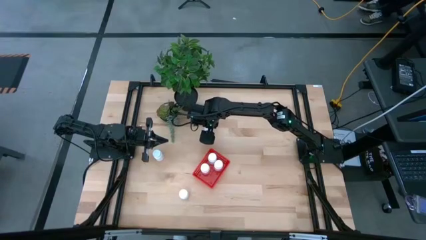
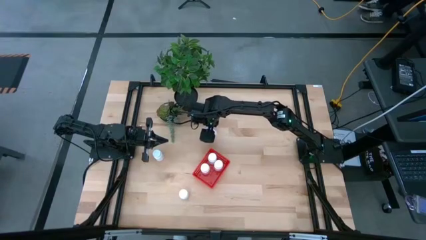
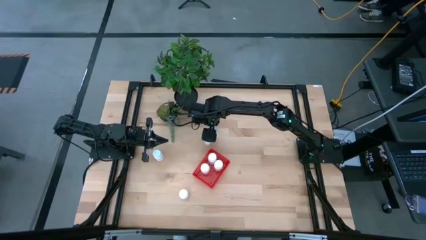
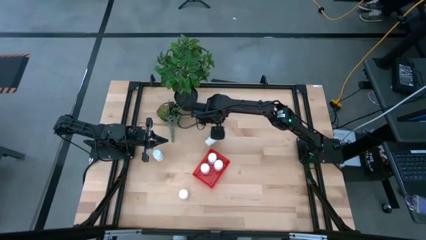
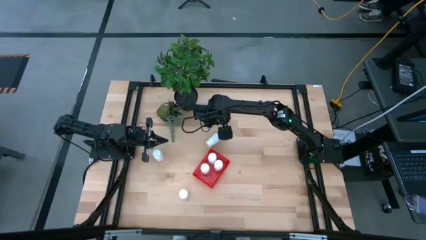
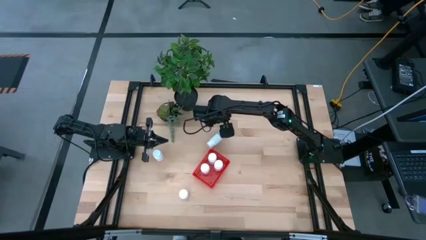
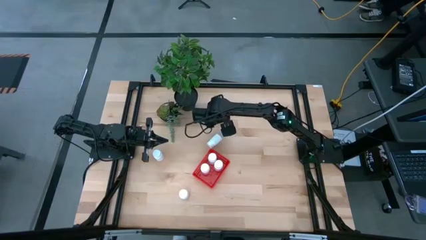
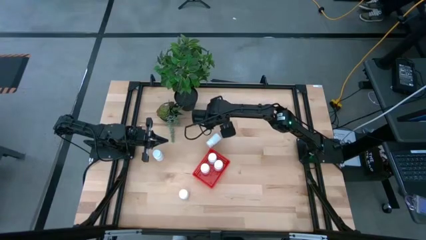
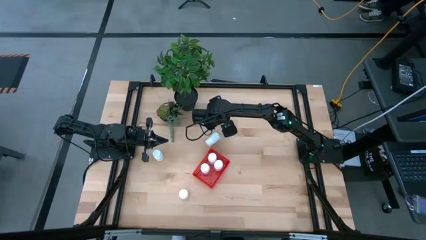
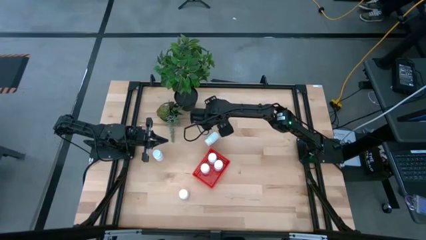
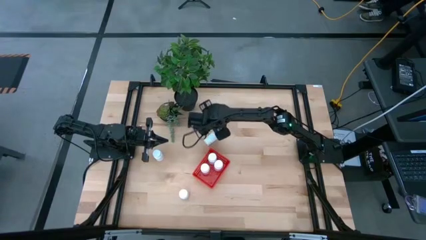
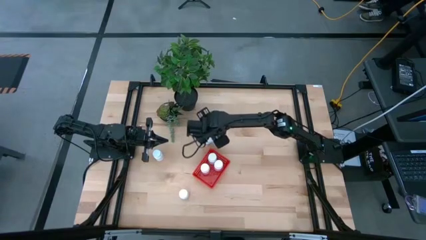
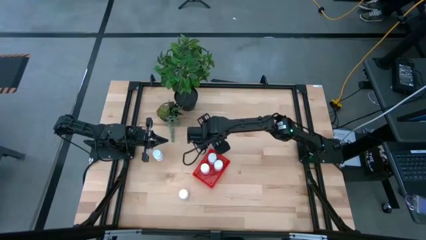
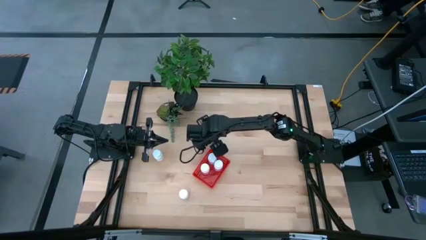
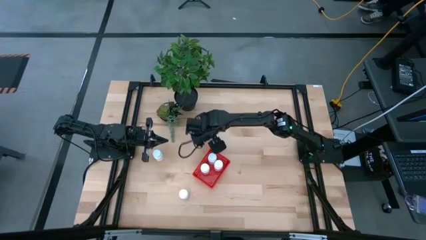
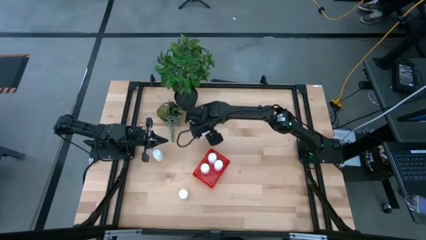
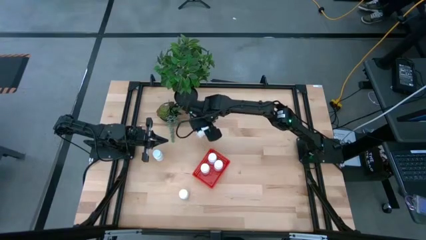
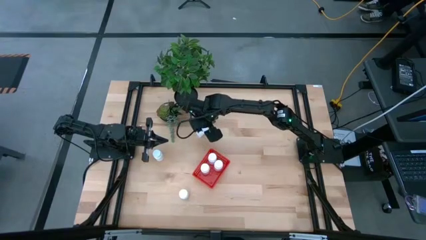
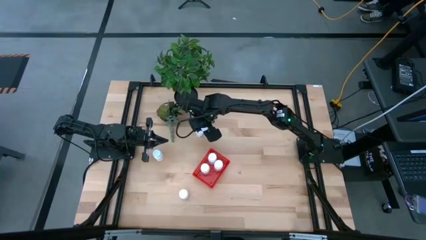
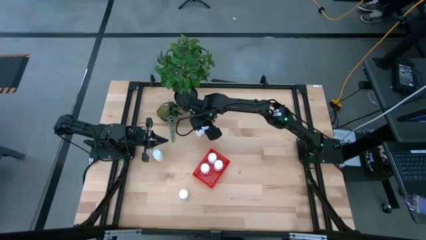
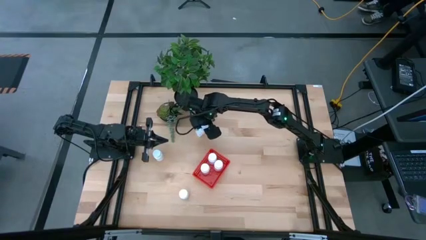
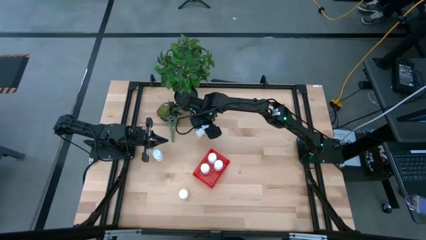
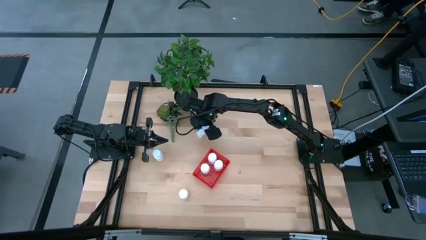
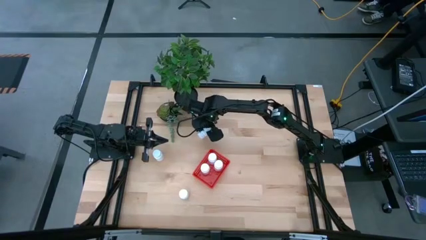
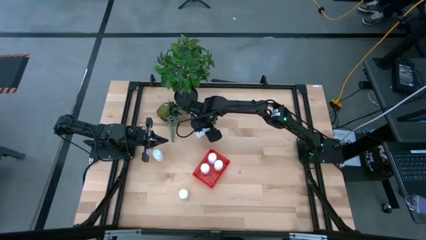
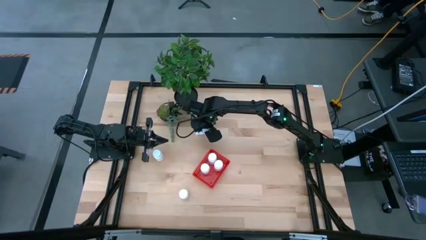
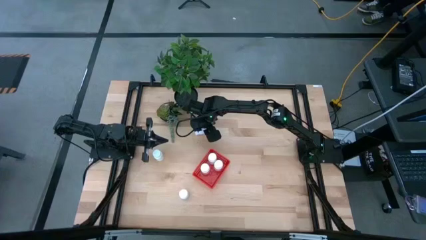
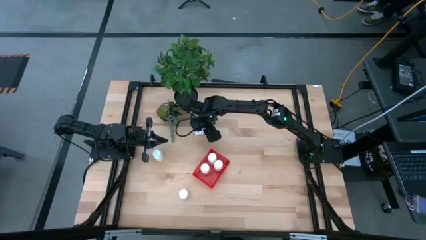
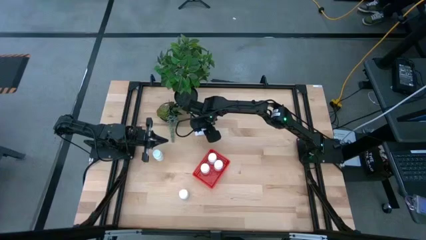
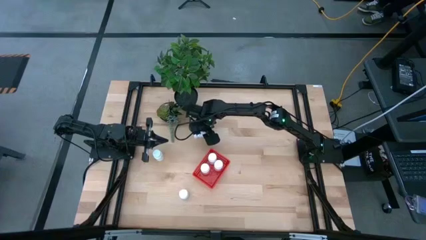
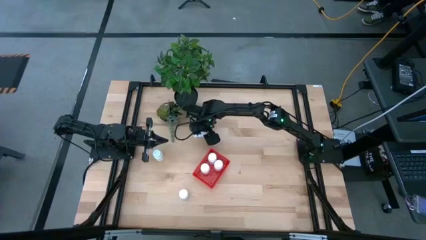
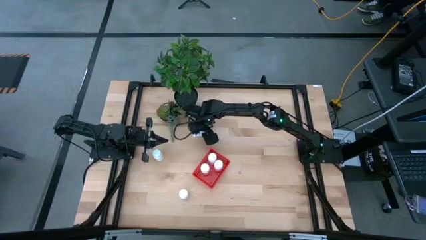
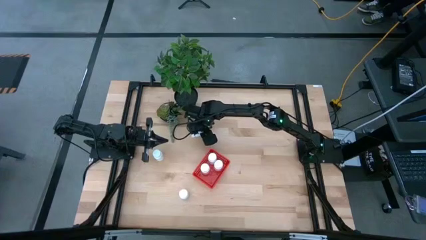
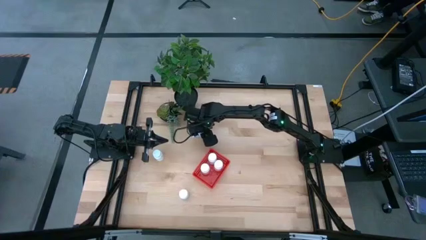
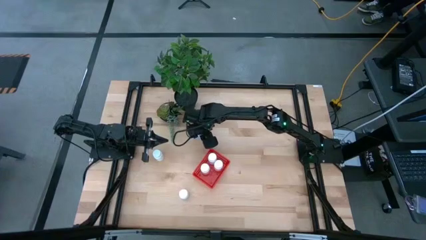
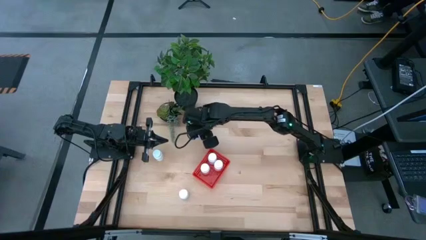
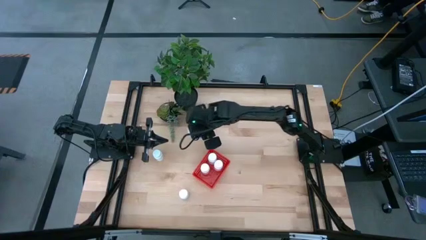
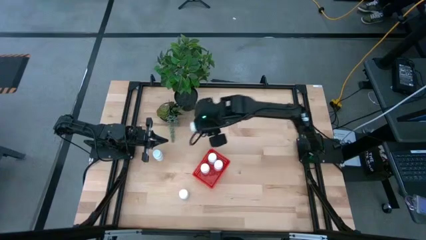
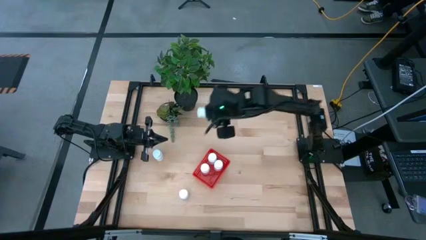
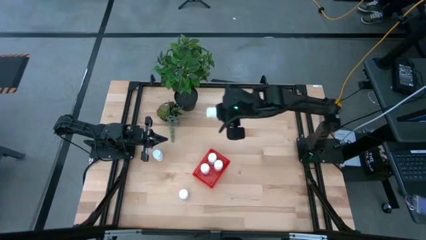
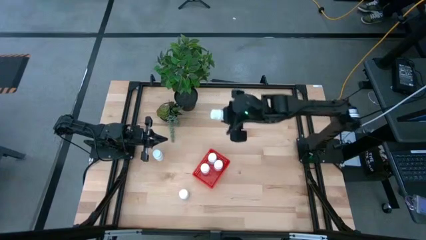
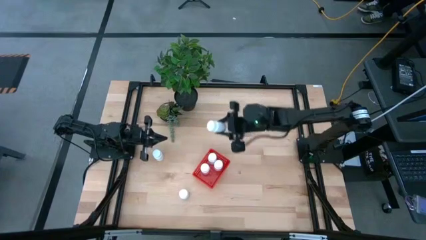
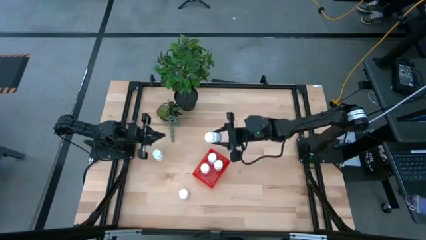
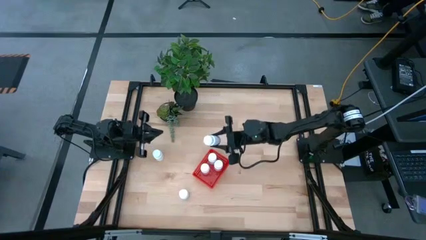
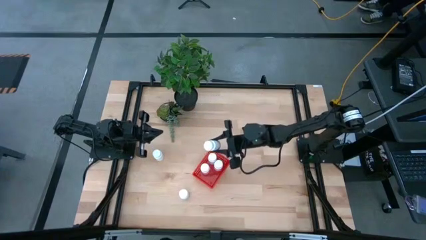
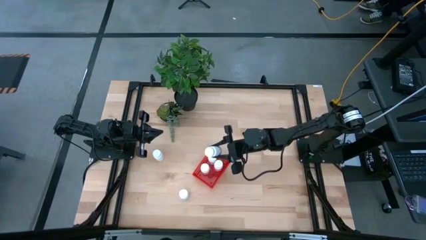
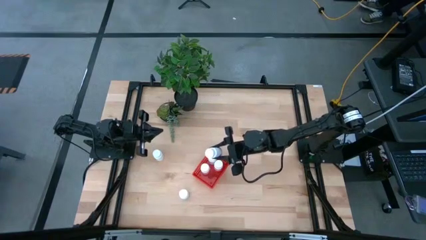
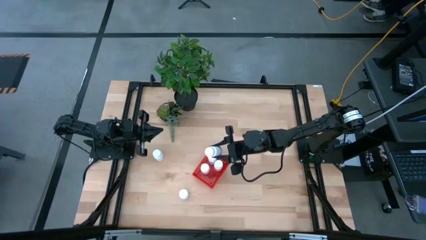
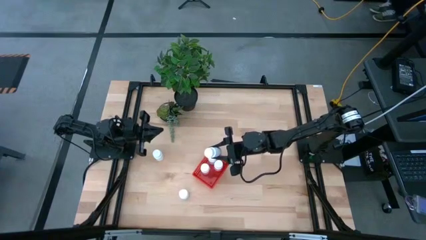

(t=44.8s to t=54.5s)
Task: Pick and place pill bottles into a basket
Put the top right white medicine bottle into the red bin

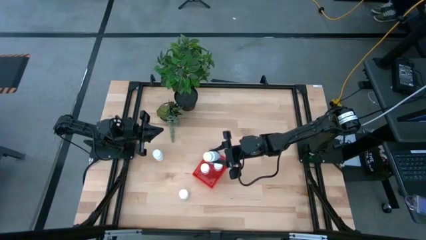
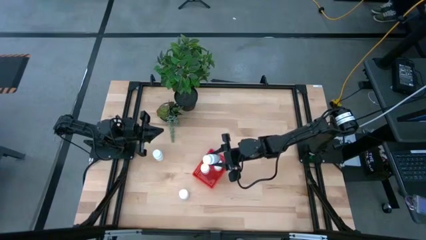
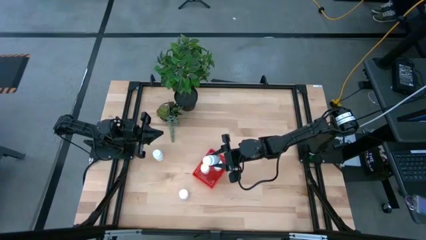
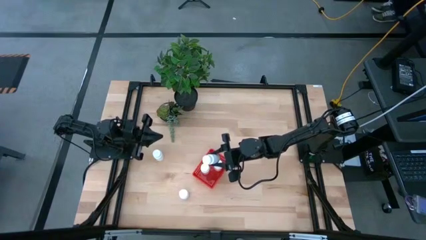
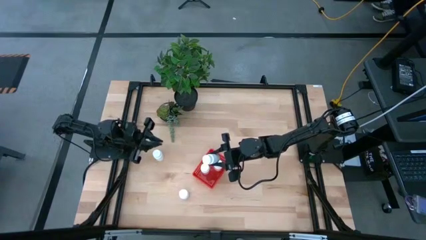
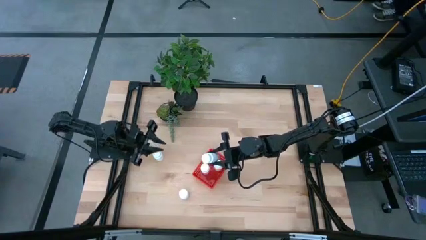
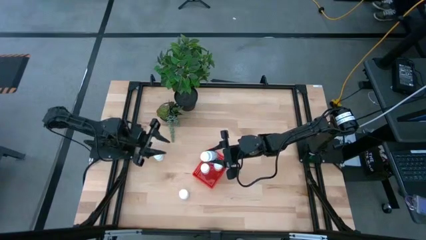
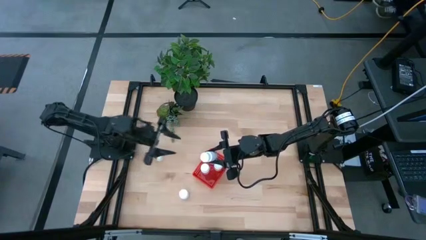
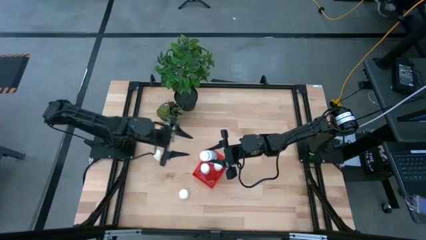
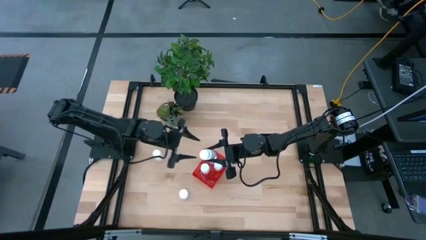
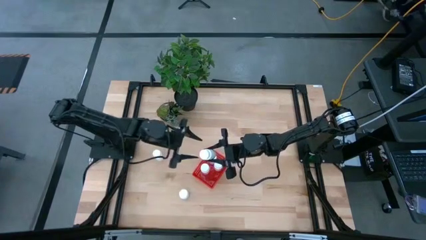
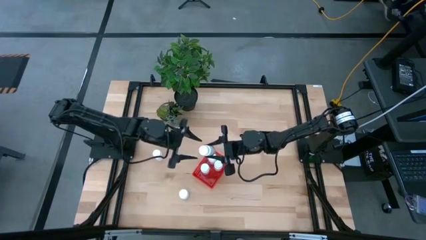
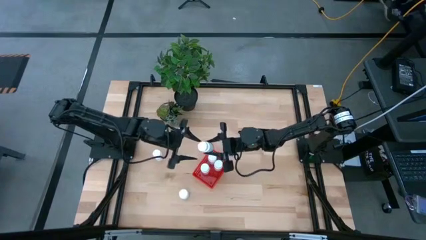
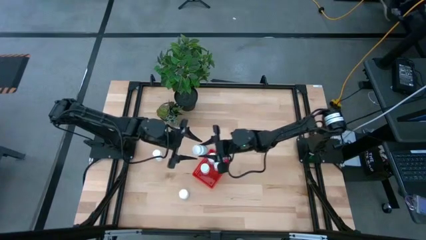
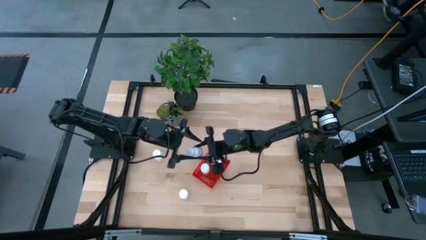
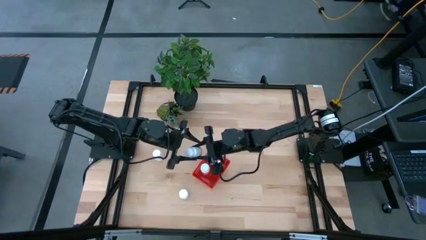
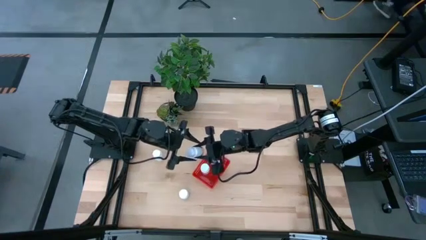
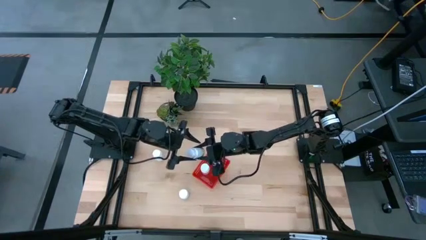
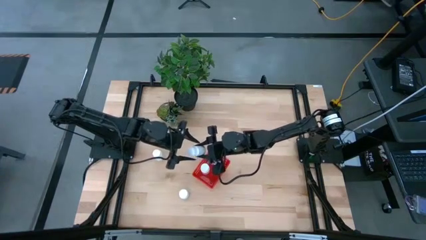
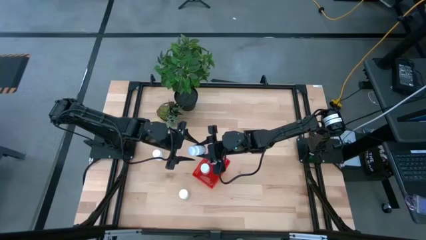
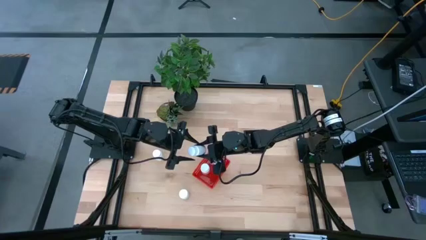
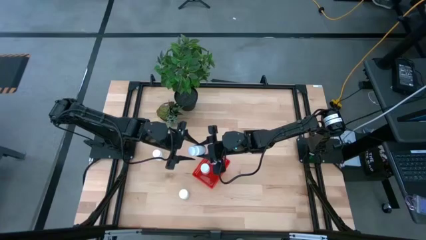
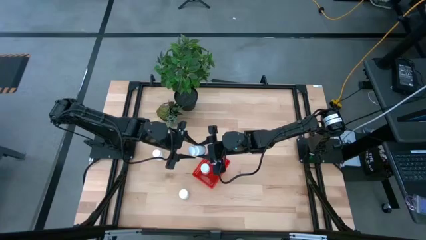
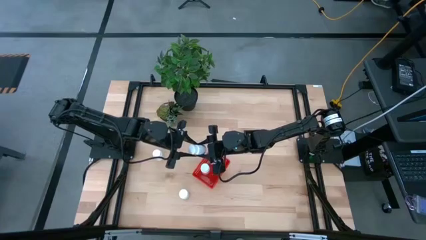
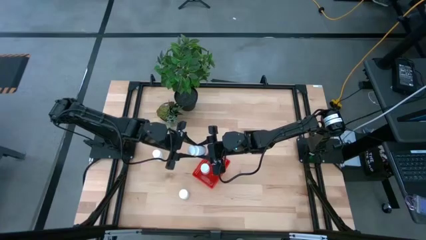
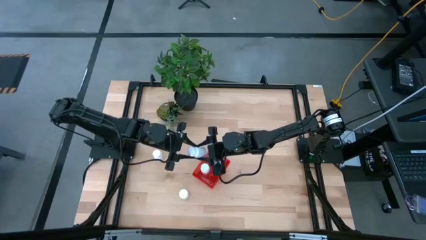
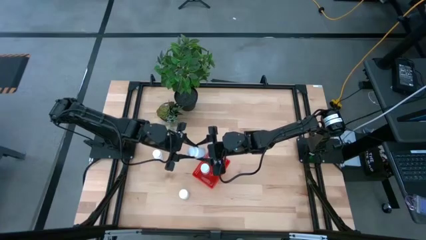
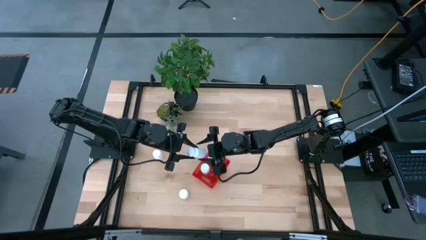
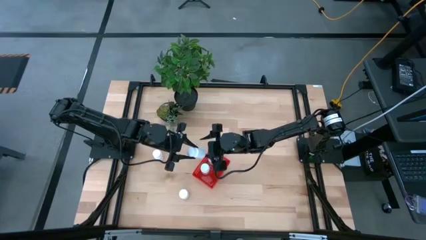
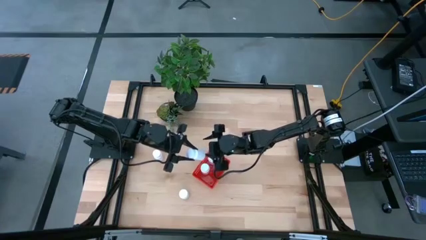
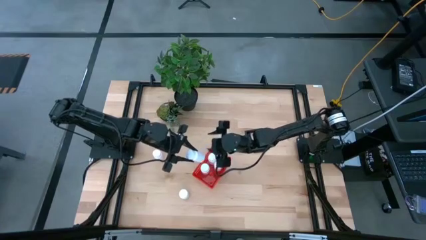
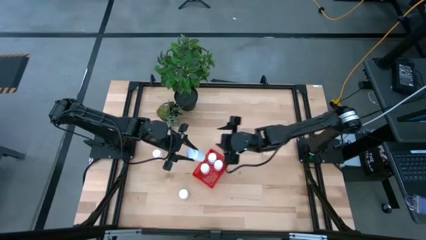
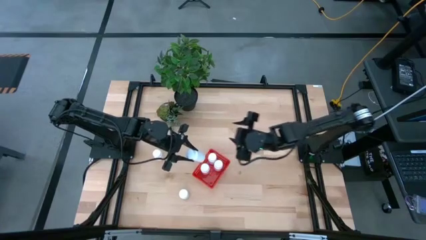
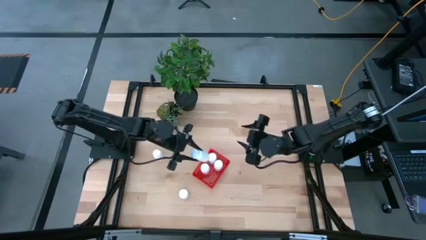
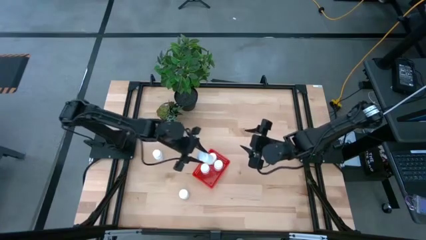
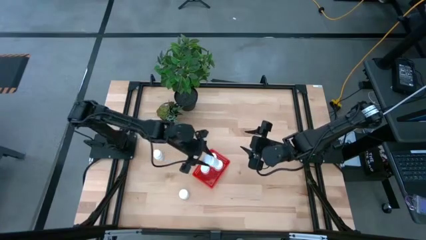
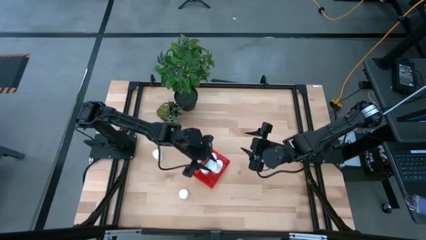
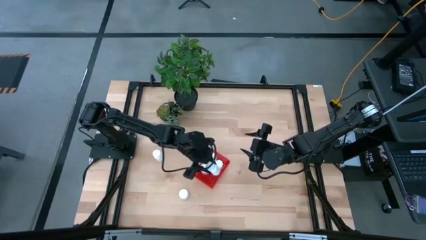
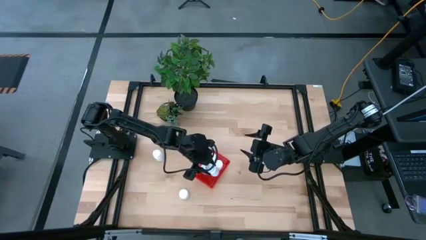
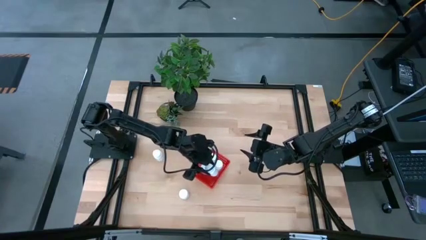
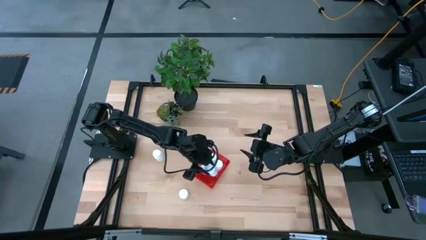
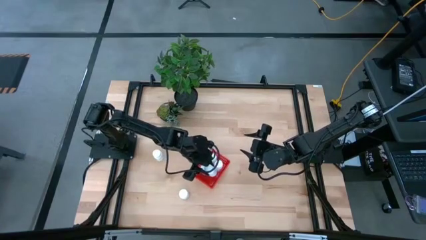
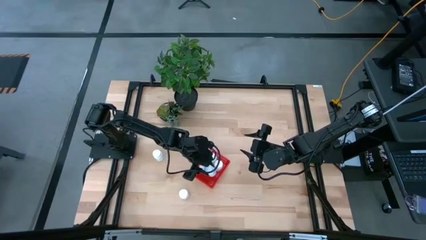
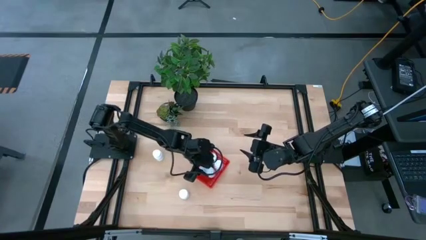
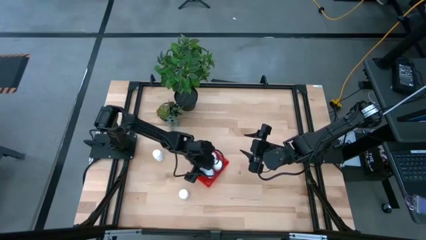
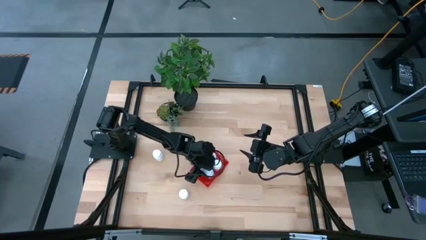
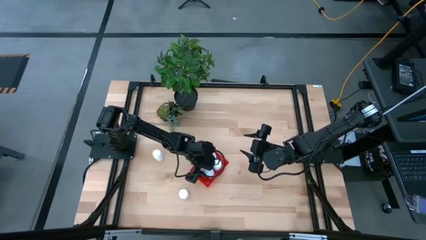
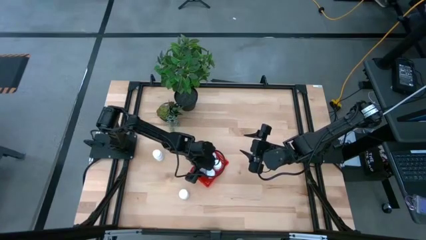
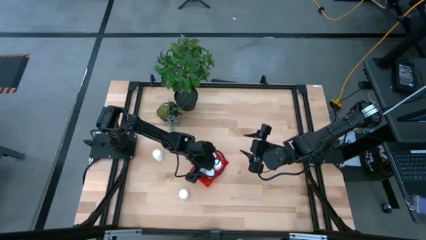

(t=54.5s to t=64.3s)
Put the top right white medicine bottle into the red bin
